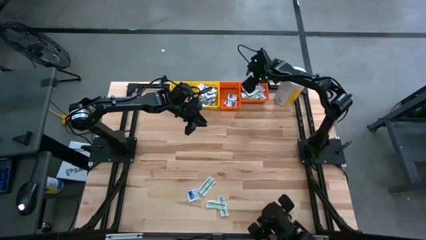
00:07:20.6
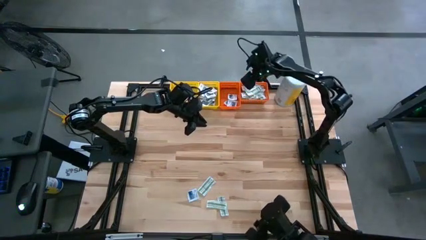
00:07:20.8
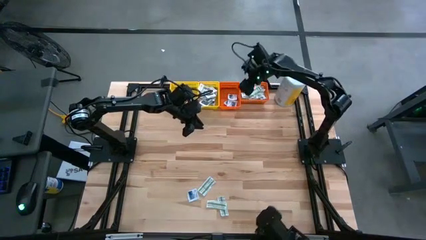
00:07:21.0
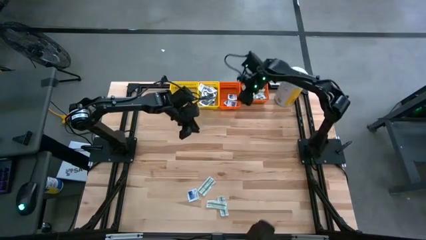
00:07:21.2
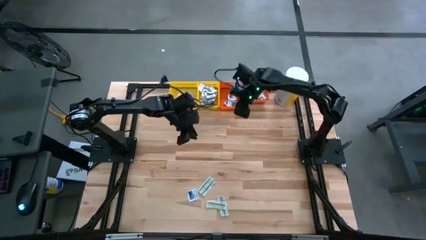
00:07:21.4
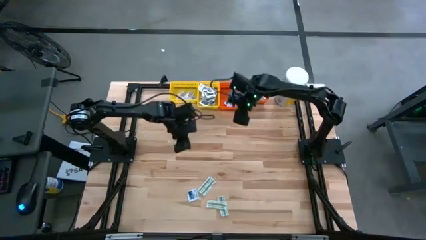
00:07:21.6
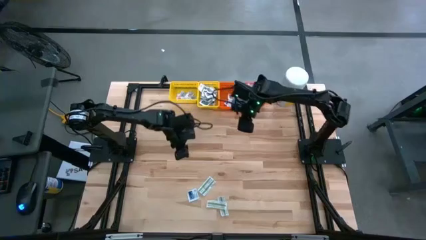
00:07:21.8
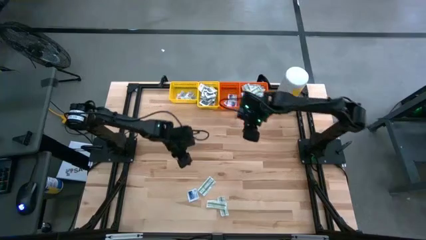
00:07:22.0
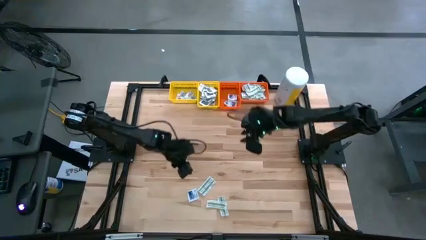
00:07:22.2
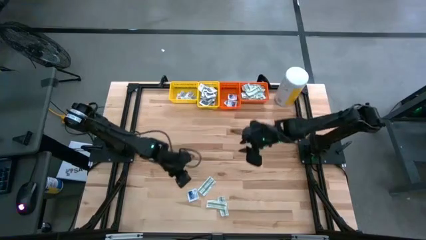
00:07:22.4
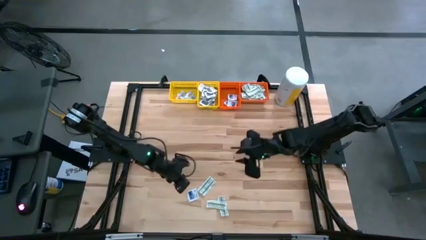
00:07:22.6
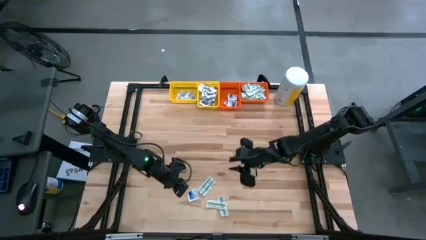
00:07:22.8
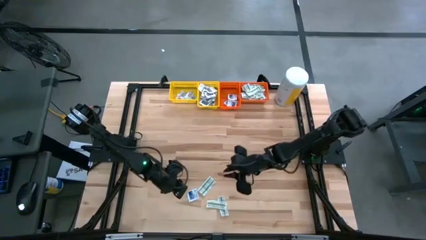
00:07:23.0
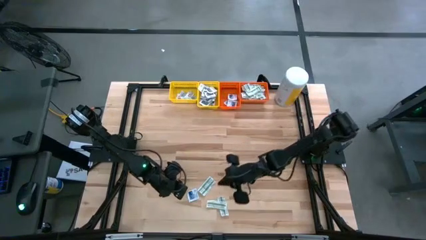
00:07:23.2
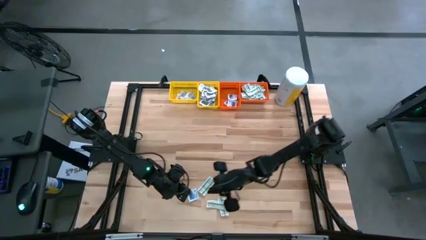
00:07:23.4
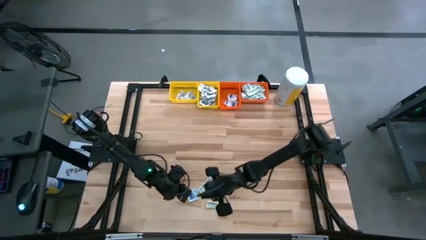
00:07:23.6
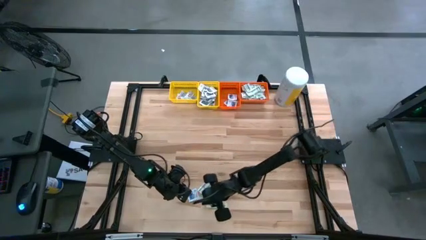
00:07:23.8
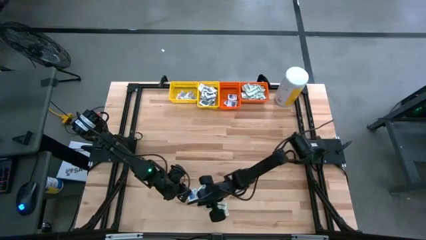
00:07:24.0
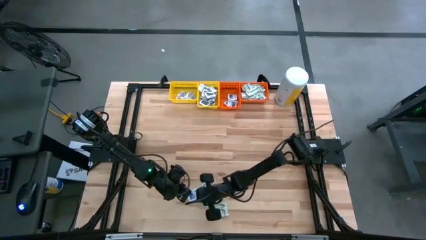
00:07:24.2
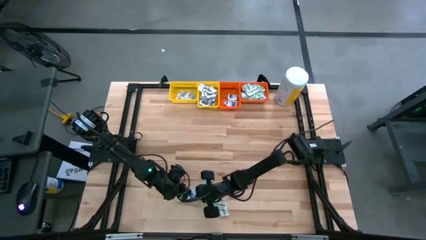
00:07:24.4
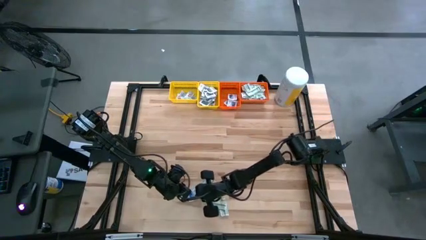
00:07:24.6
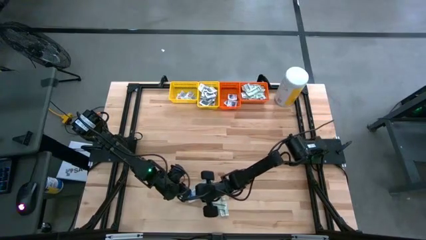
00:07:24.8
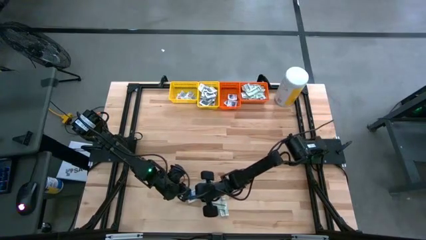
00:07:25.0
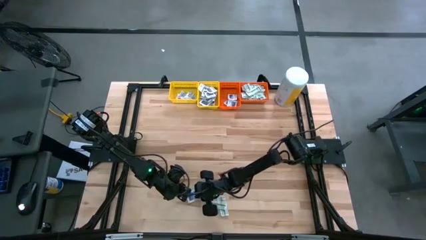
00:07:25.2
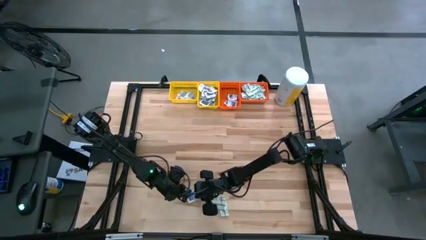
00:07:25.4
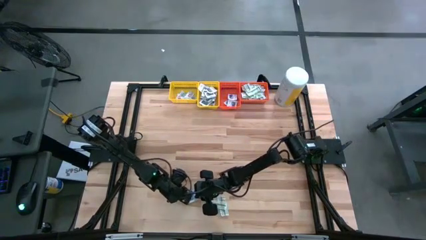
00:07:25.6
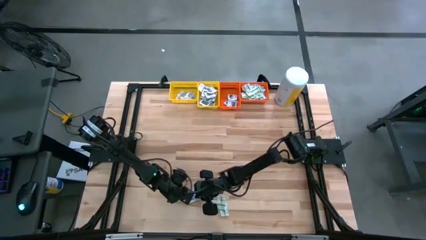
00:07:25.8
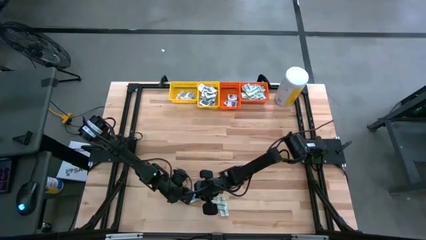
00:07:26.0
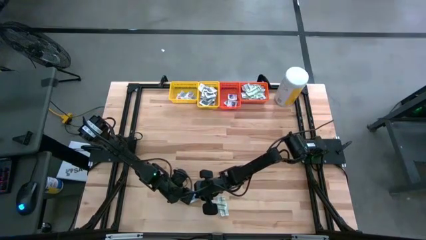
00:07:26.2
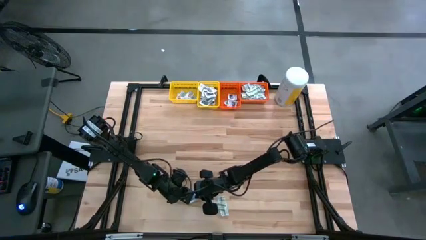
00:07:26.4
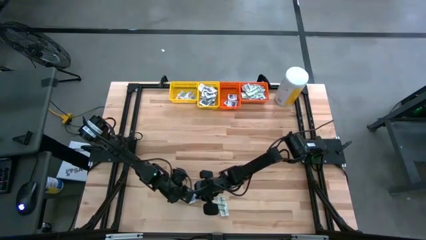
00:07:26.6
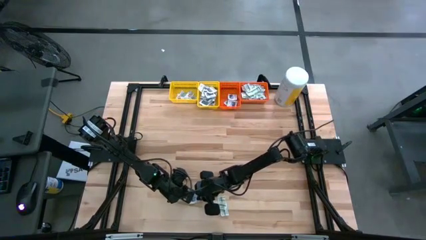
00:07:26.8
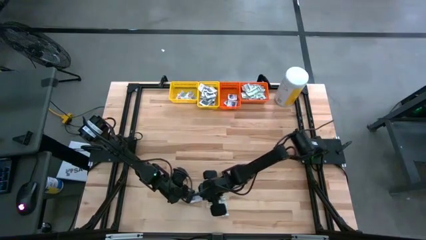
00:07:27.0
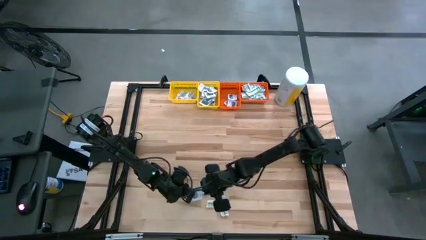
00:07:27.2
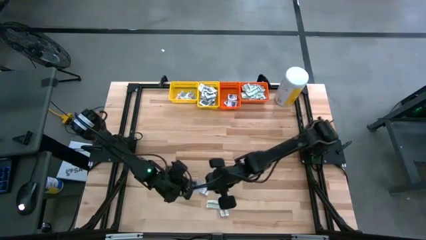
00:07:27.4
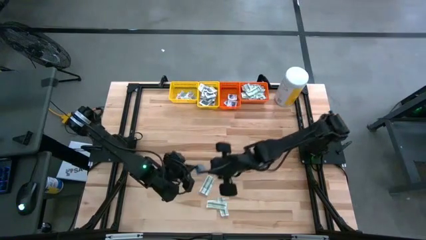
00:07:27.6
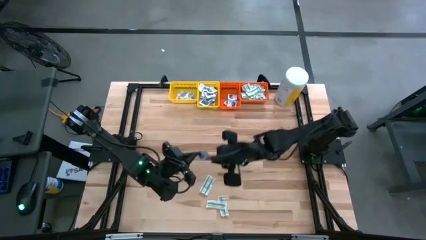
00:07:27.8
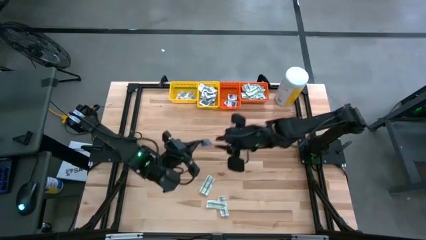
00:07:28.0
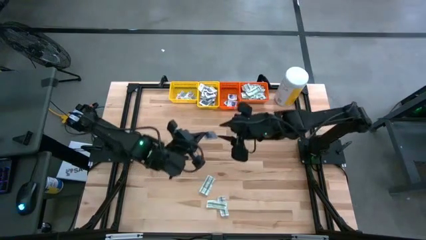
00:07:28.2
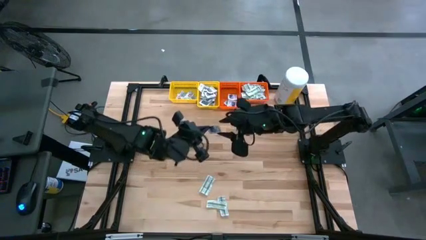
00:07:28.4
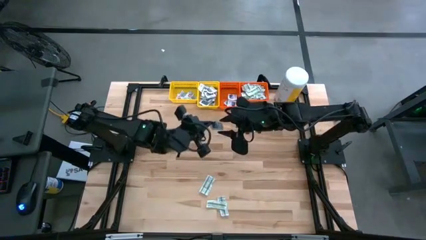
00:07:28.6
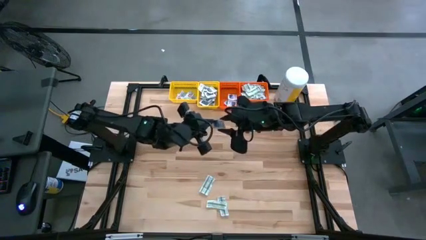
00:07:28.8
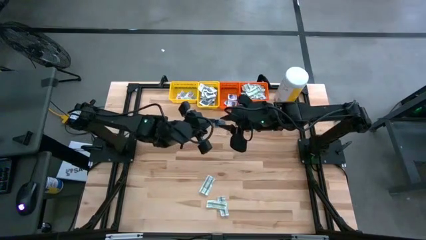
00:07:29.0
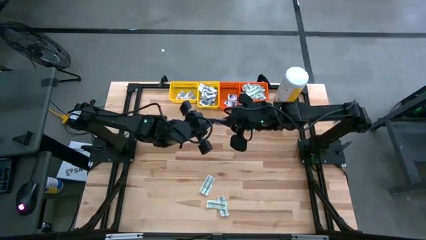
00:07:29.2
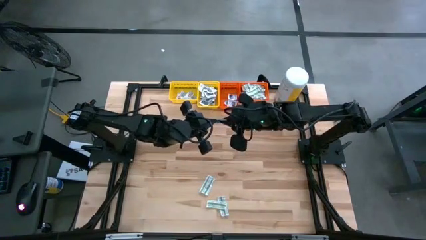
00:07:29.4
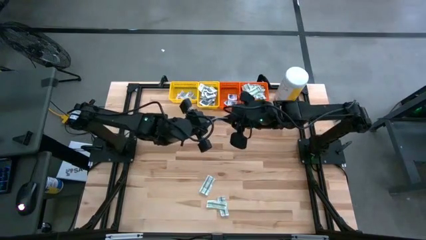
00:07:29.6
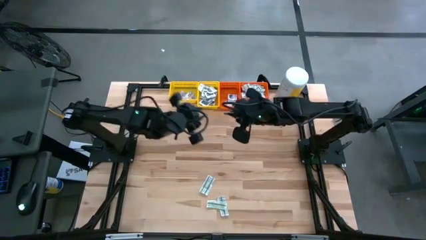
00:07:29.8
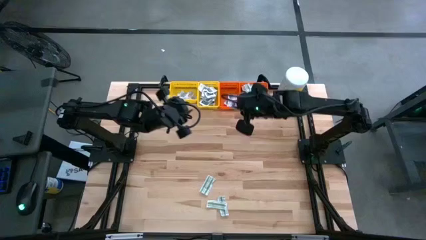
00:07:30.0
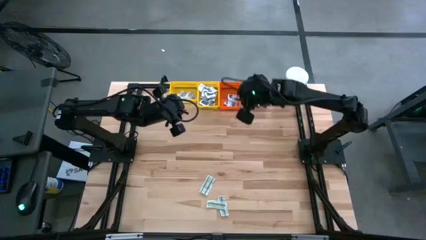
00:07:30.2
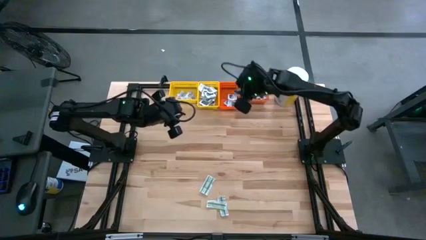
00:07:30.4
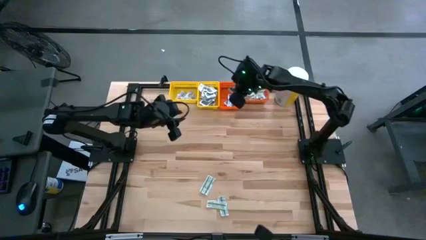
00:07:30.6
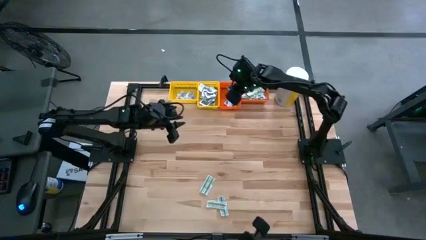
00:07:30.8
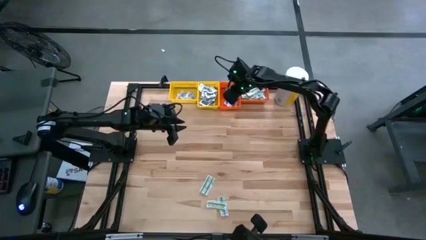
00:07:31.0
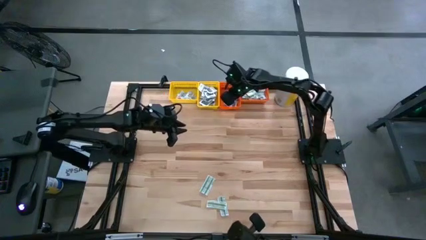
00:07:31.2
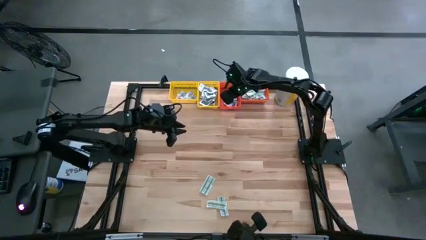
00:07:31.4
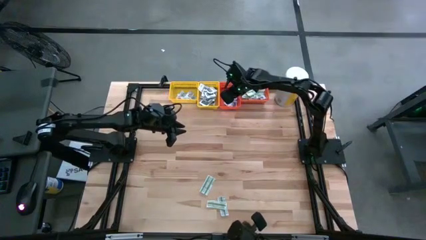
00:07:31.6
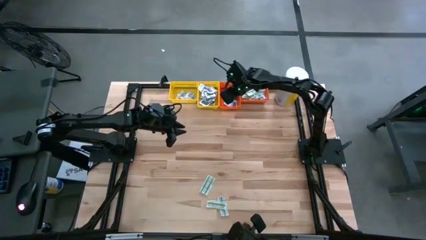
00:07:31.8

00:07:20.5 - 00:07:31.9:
Task: Pick & Place First Aid Supplies
Put the blue pad into the left orange bin

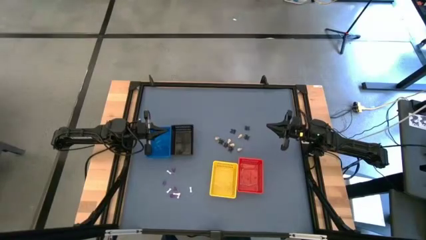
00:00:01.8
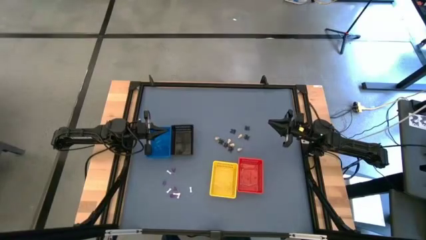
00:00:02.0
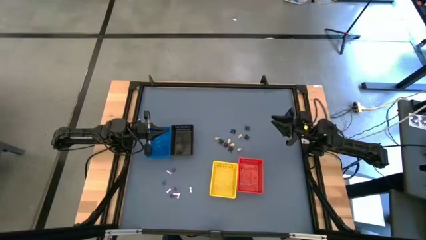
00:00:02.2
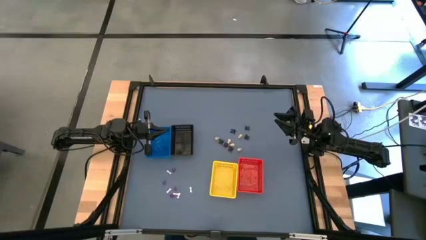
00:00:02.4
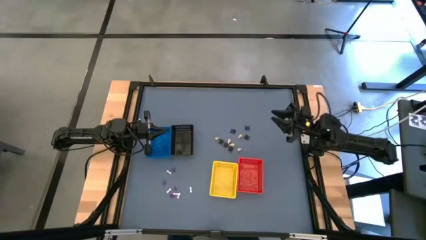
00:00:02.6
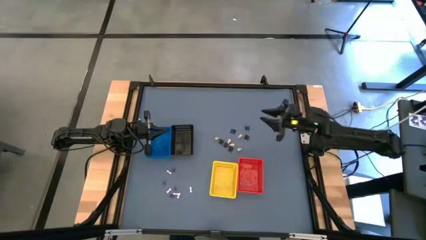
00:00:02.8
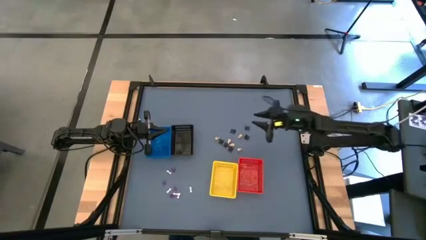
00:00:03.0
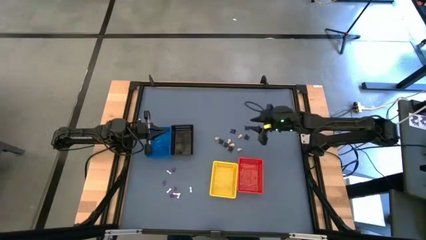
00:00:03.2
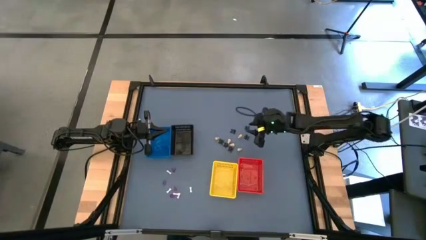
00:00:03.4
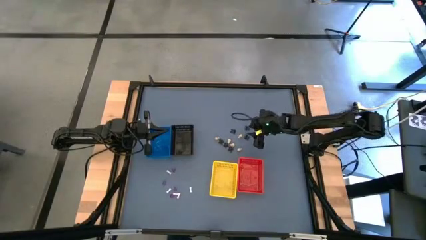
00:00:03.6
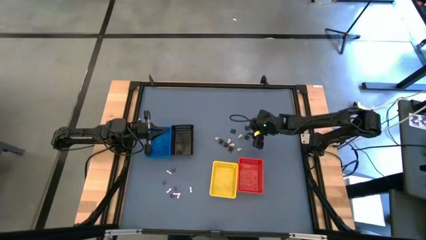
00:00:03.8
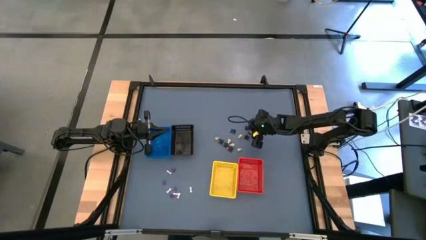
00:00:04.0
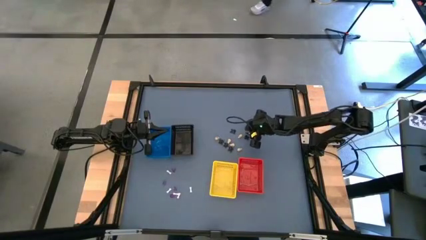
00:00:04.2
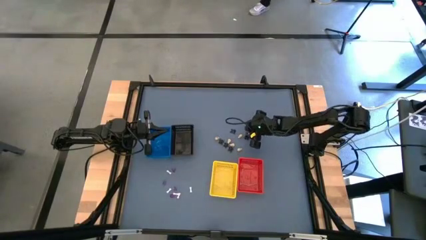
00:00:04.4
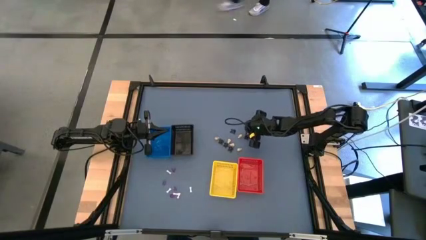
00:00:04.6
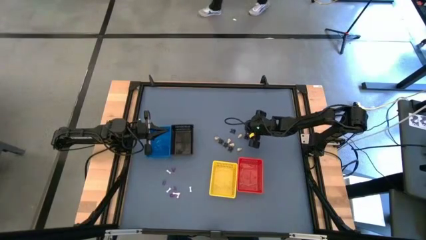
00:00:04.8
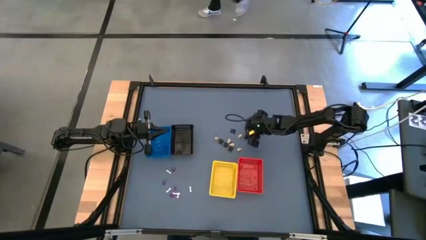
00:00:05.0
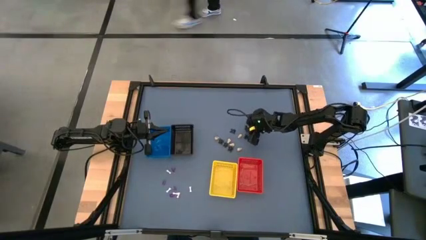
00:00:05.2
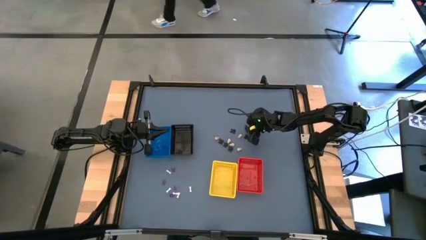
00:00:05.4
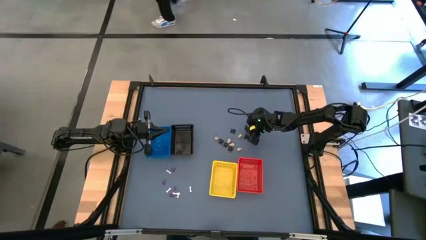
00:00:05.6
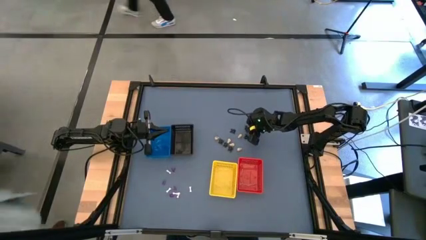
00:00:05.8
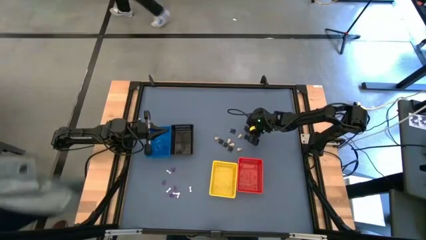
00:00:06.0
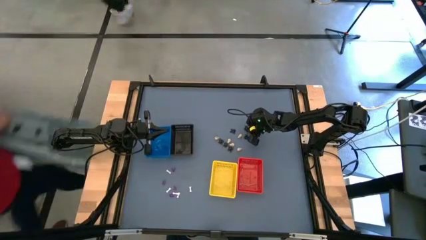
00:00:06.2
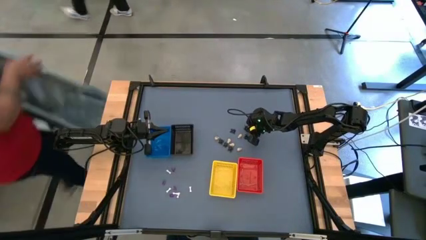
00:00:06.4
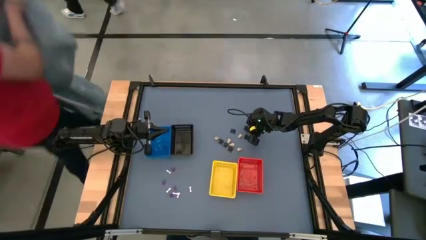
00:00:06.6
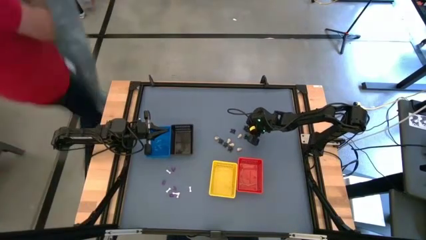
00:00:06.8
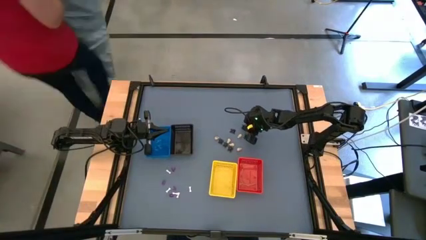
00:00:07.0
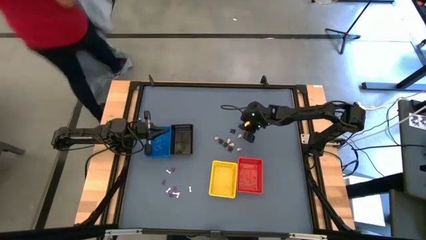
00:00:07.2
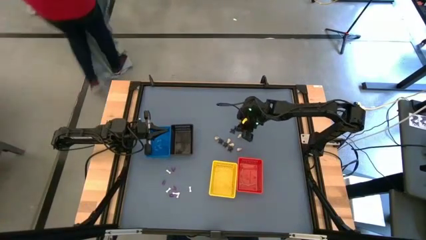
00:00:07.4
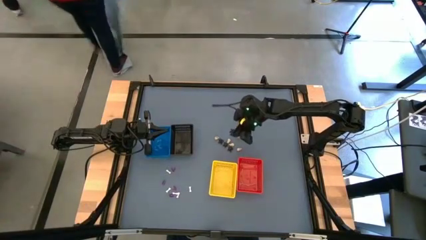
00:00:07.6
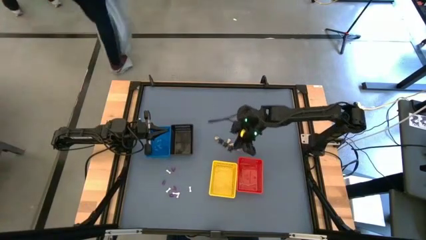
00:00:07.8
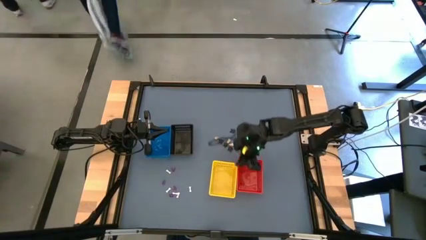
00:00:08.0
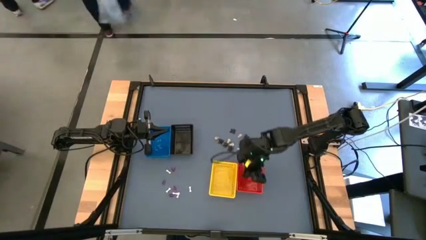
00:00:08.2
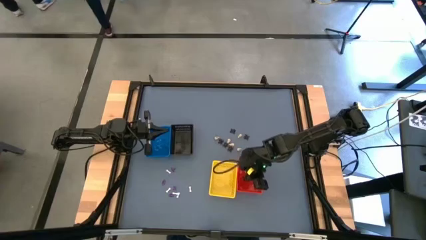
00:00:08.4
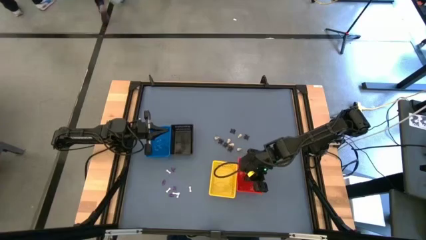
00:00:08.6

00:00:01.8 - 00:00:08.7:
Task: Sort Halloween decoration
Put the spider toy into the red bin
